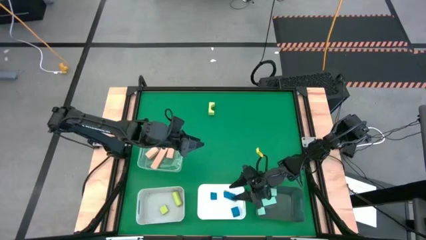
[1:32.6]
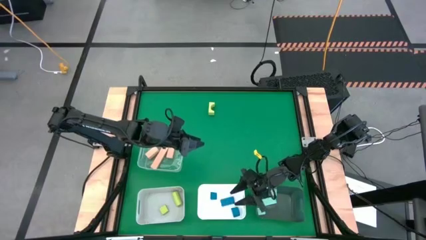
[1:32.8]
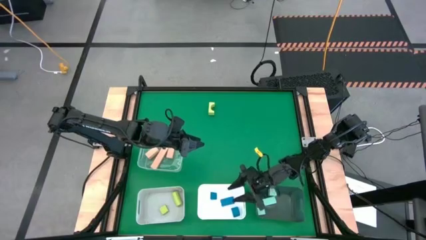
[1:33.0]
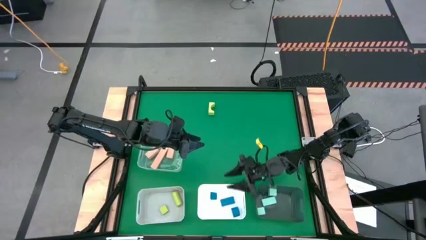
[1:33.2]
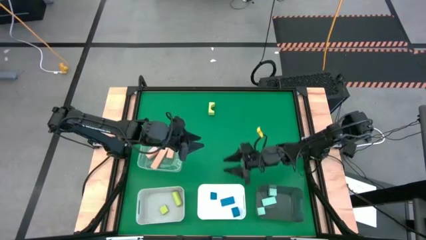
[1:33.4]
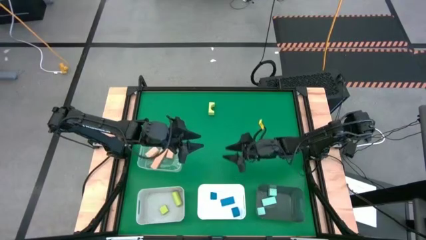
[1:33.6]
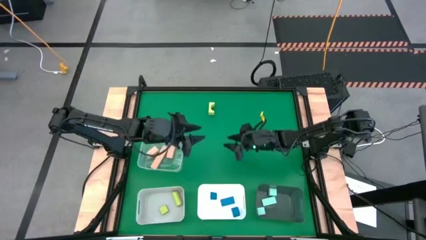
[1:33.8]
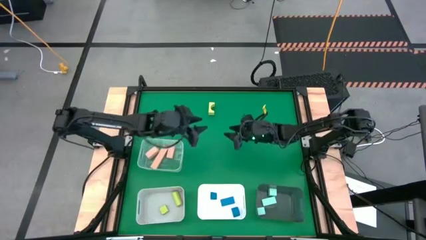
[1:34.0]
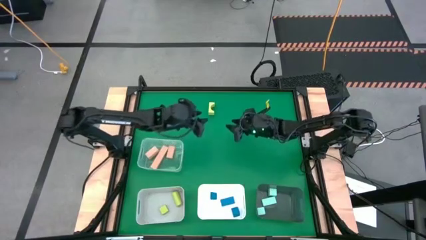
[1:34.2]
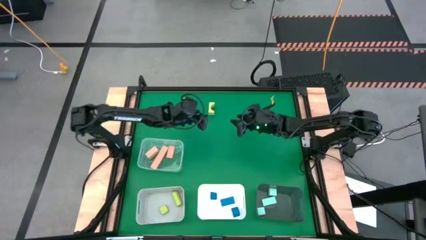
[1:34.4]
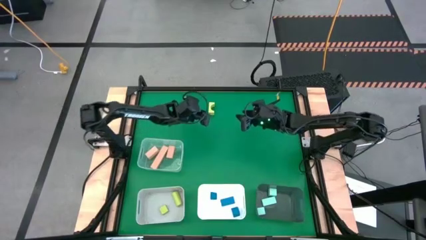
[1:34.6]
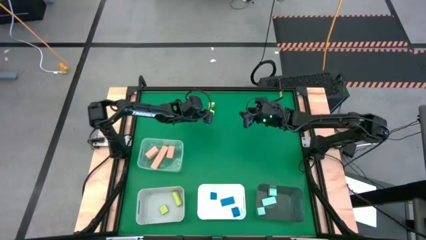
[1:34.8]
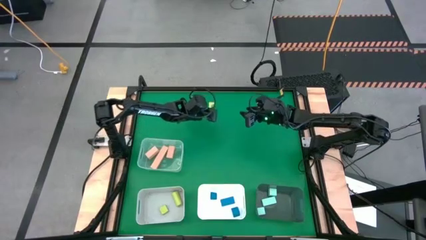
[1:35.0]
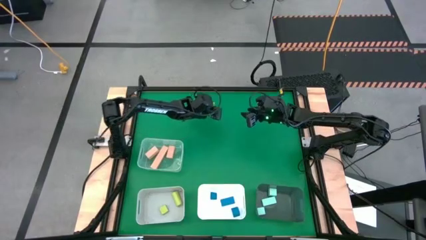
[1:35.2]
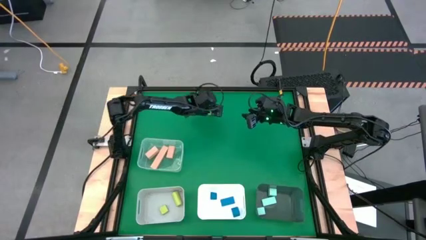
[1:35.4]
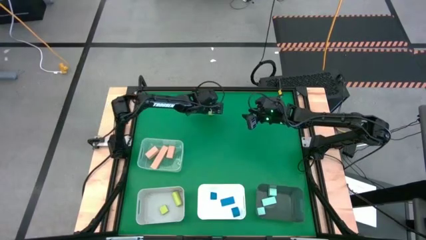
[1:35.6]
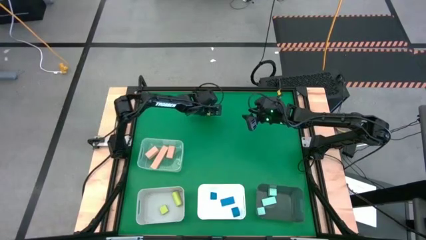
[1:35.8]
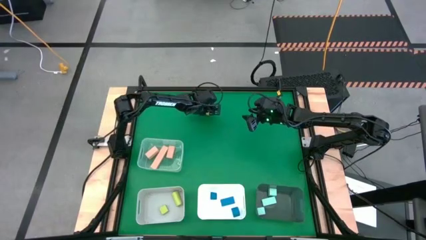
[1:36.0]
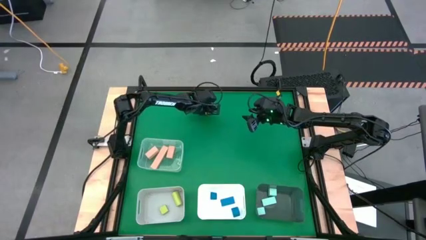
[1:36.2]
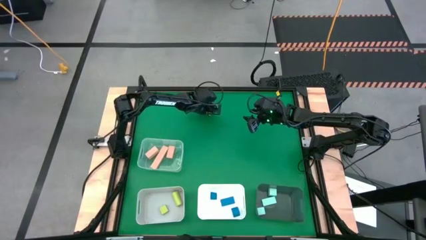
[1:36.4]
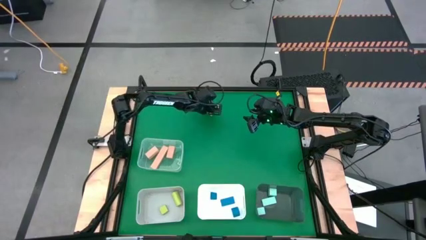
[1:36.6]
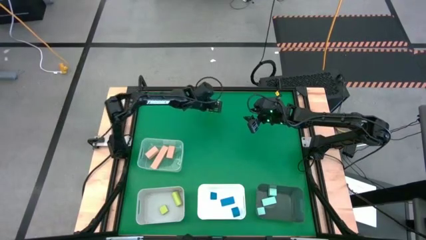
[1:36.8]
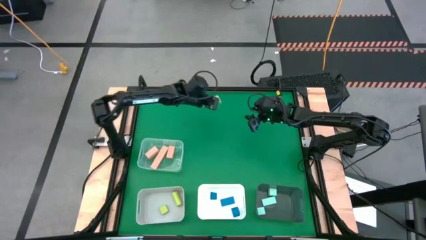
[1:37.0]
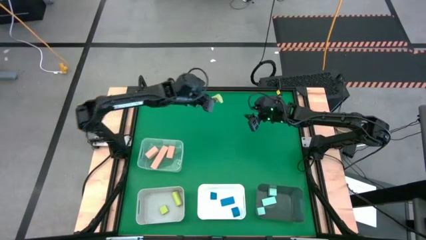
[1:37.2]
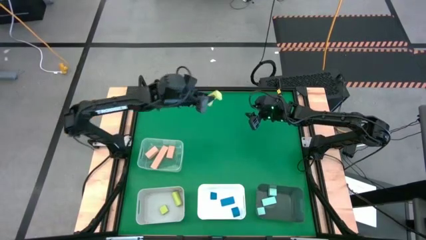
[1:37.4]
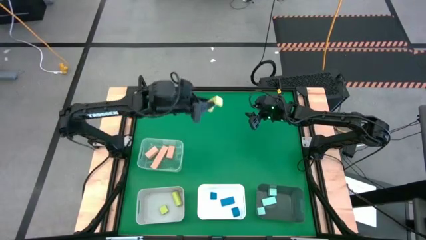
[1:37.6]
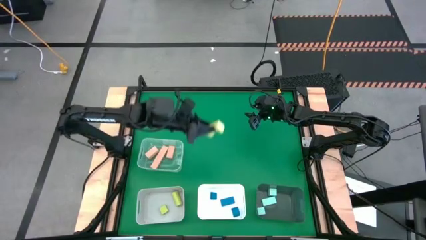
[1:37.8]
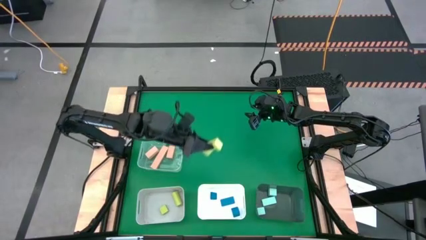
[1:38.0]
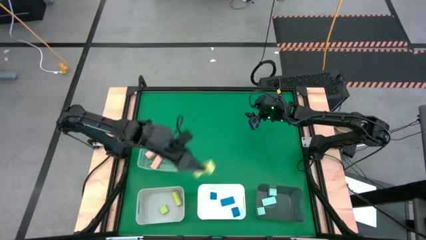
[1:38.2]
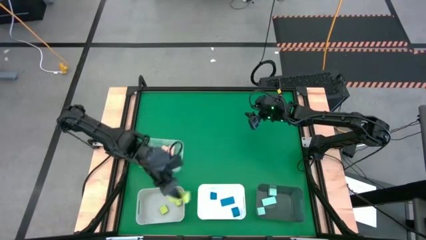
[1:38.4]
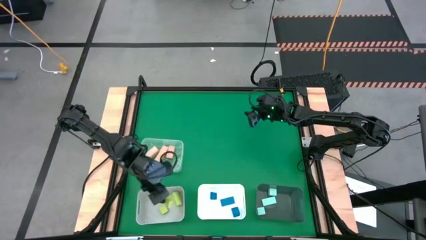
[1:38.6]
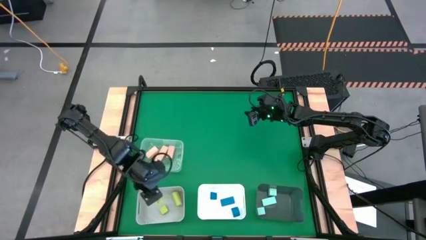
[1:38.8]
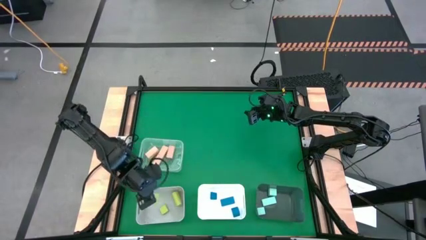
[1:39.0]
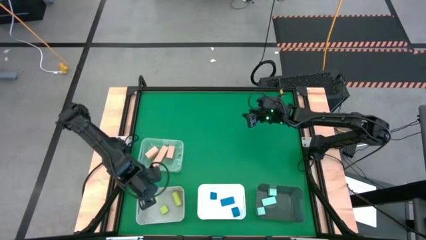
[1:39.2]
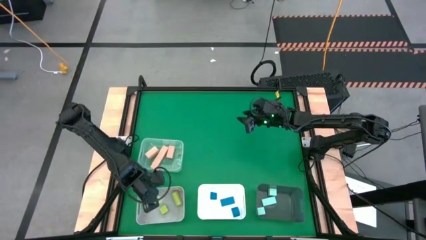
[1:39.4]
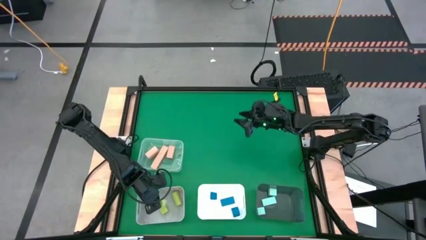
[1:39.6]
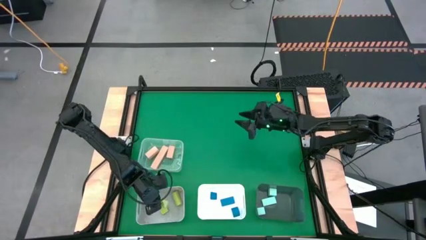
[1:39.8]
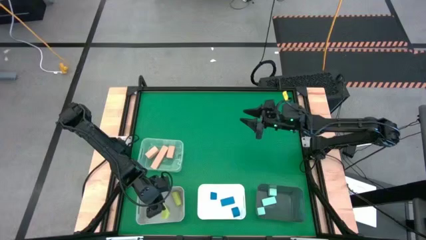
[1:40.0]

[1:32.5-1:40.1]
Task: Sort & place blocks by color
Put the green block into the gray bin

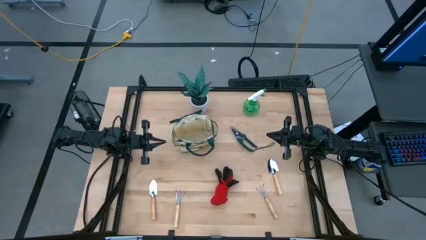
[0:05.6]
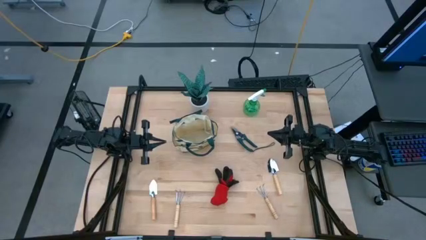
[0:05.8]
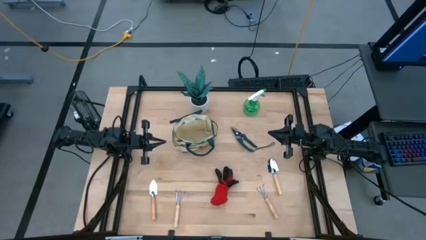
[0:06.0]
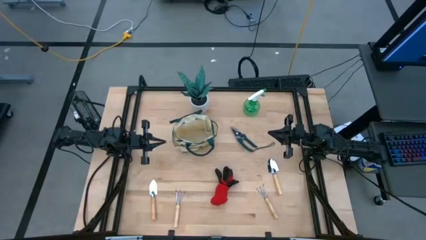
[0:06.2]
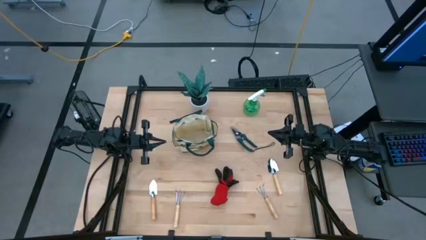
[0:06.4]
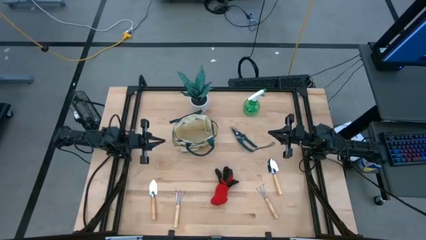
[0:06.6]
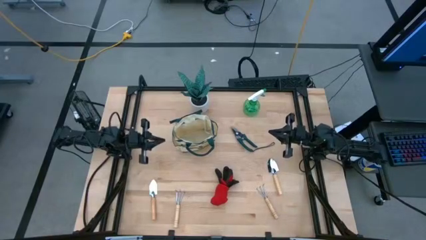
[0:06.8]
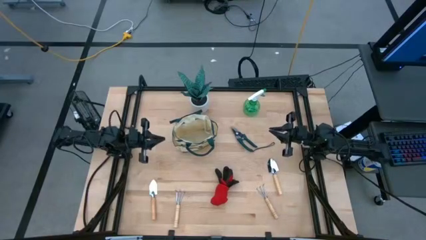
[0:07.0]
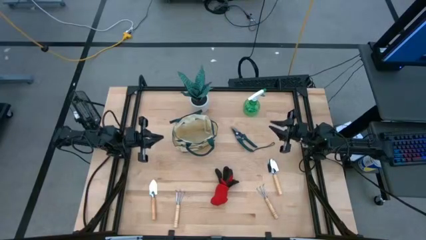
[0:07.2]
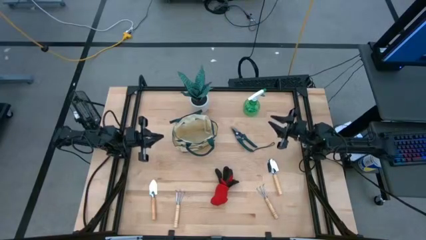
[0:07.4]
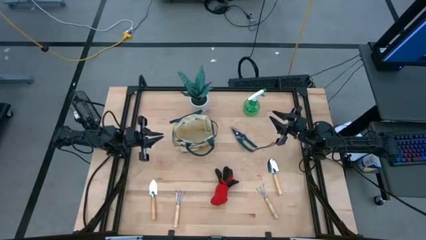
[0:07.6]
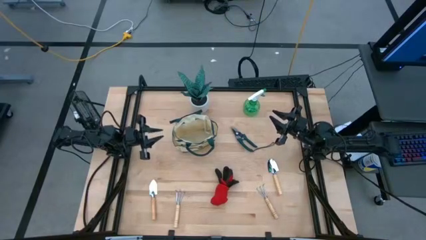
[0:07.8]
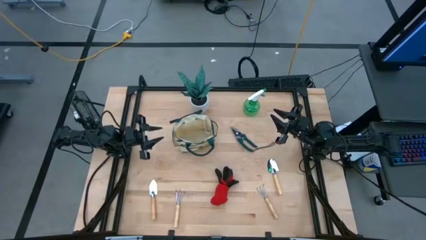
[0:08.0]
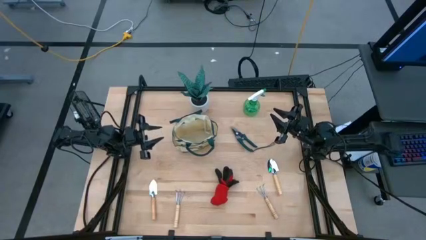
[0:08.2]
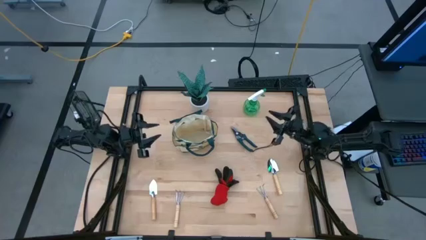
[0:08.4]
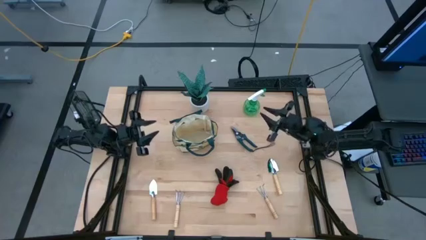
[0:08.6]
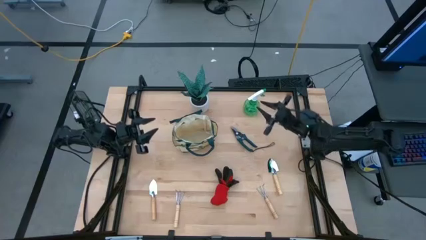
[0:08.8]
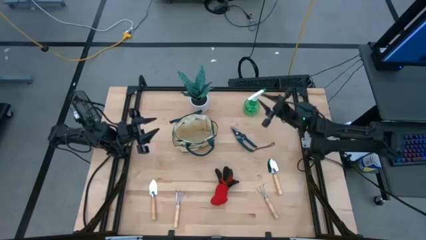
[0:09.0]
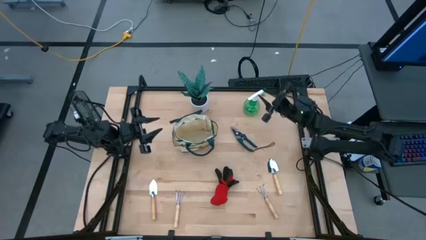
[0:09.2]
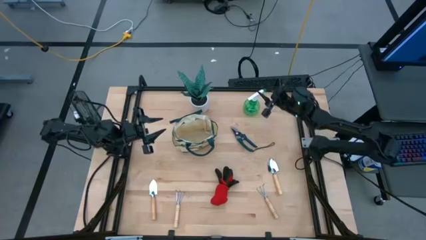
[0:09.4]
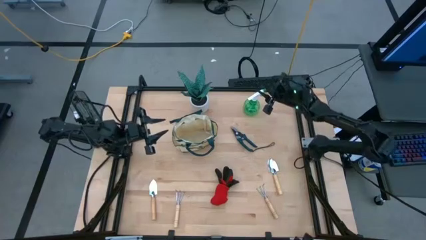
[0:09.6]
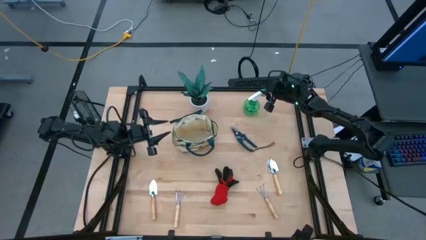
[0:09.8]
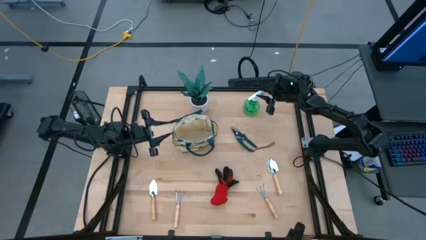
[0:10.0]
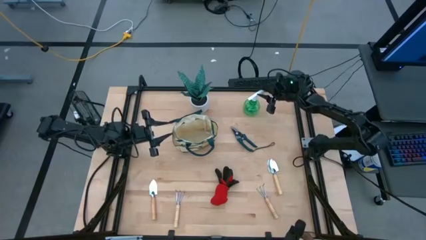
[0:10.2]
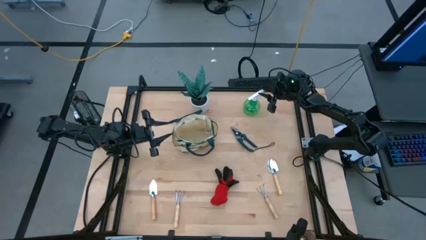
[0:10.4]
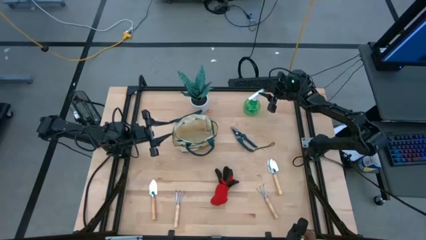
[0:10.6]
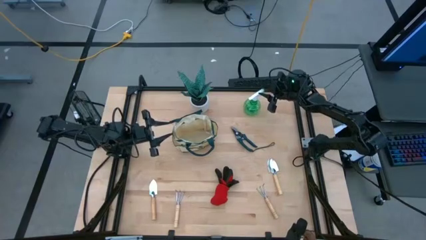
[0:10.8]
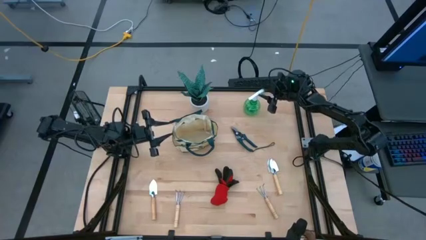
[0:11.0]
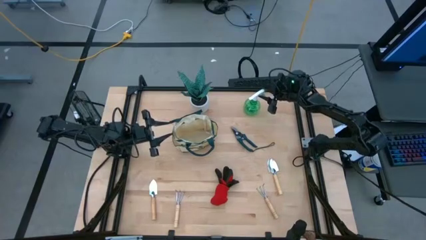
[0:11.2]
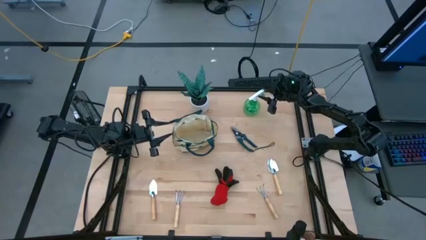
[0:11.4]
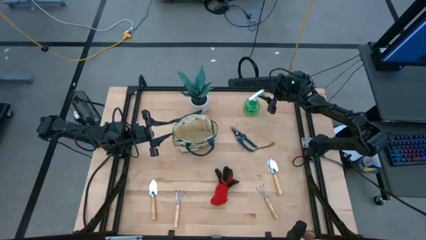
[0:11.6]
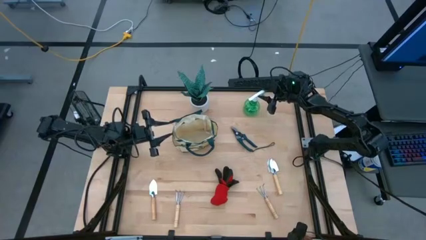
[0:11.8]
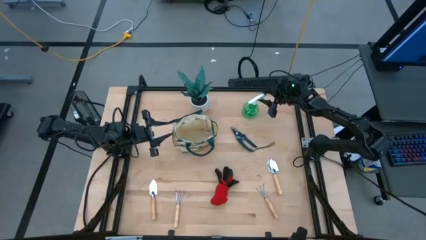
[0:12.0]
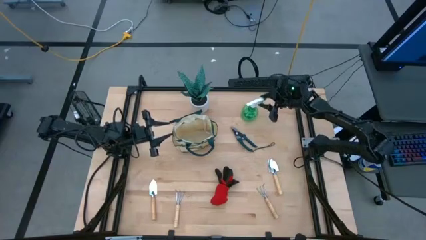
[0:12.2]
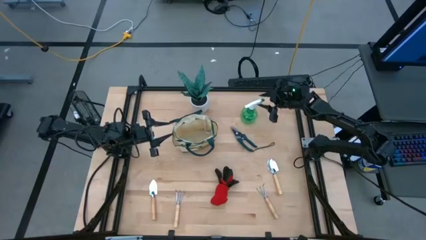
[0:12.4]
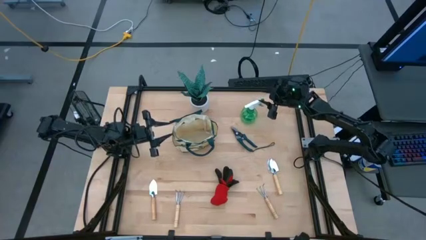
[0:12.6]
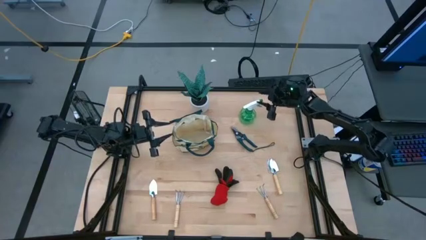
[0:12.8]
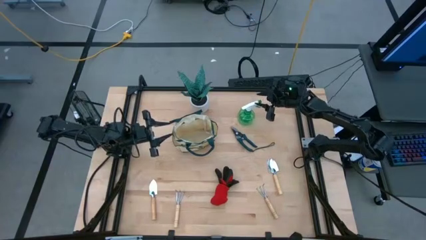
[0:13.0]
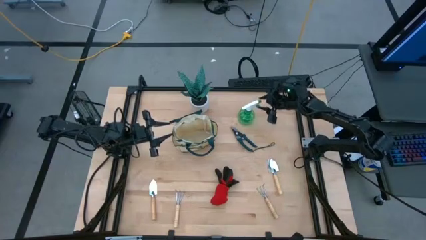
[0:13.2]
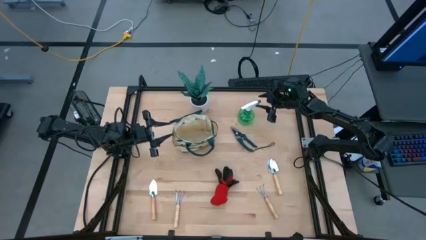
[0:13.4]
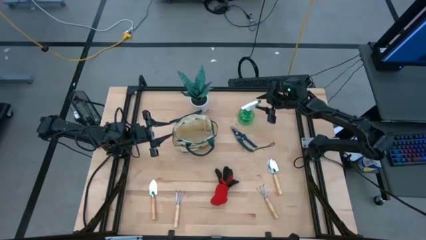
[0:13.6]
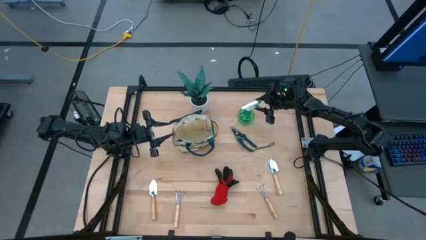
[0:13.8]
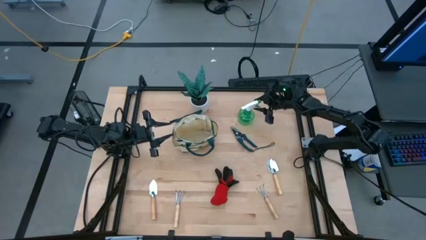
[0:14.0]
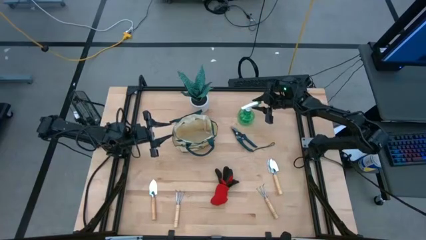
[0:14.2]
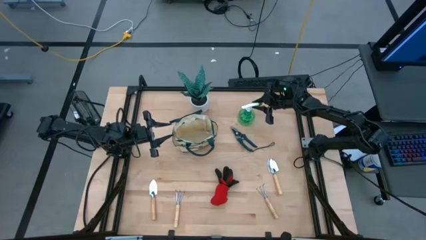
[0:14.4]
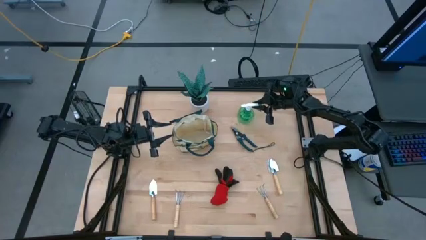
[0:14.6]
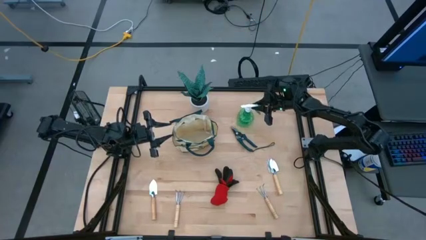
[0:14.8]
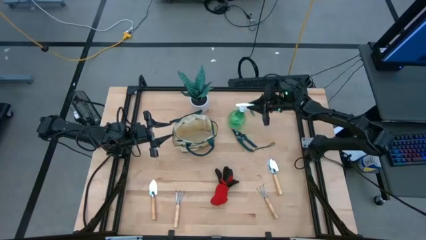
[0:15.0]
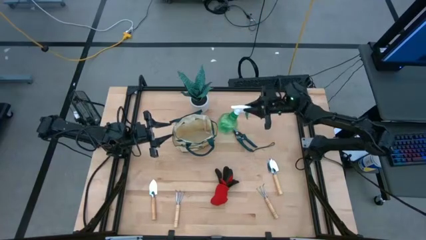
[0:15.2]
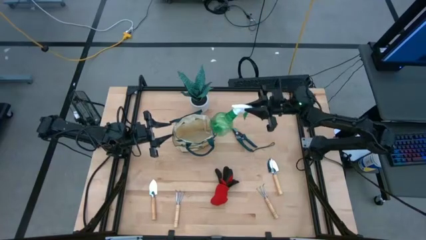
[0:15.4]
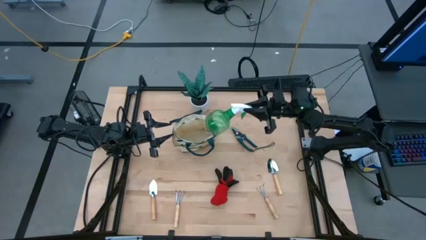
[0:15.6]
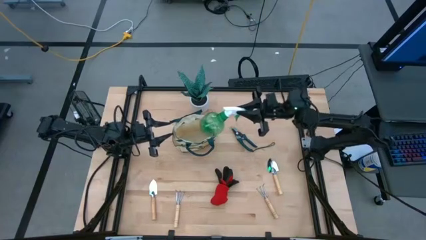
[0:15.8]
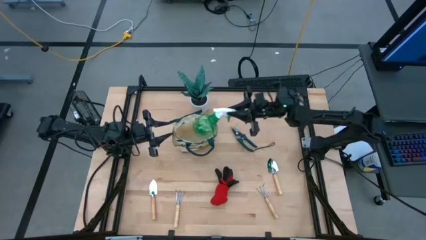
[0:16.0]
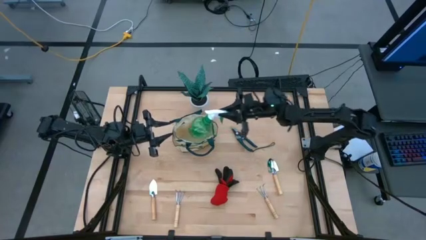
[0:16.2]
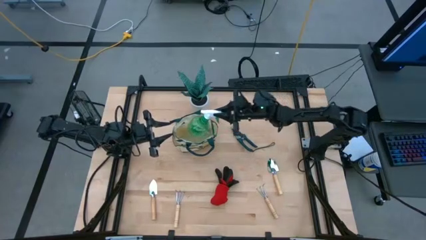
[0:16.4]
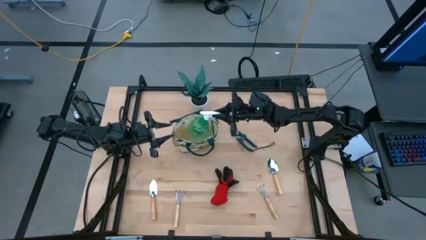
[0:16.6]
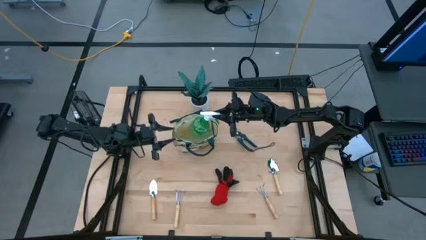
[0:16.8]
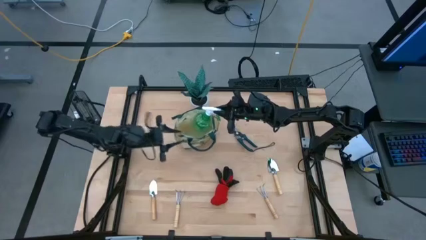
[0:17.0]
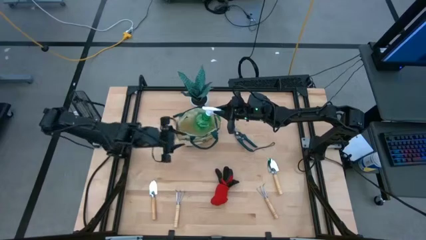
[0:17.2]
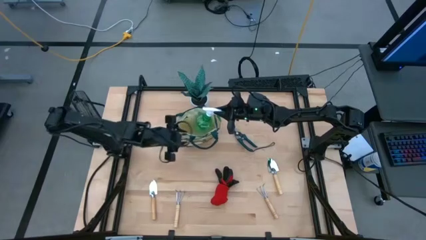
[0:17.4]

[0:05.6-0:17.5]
Task: Pick & Place Garden tools in Gardening bag
Put the green spray bottle into the gardening bag
